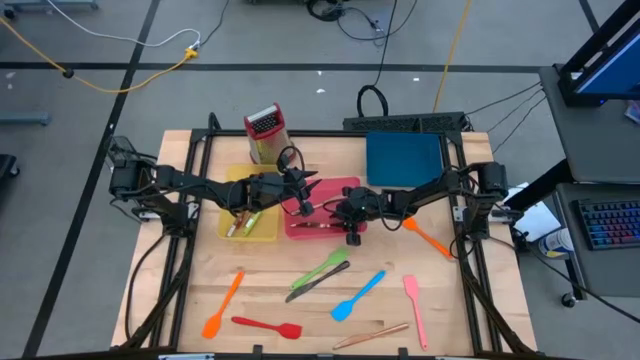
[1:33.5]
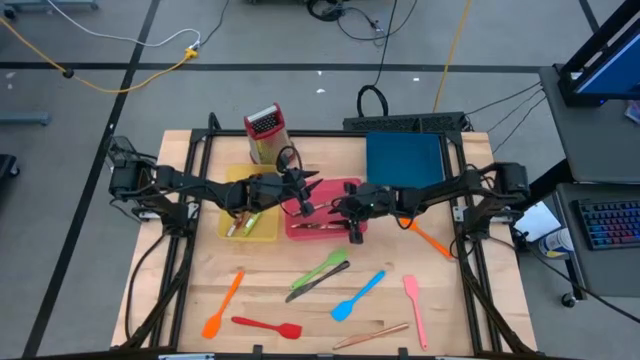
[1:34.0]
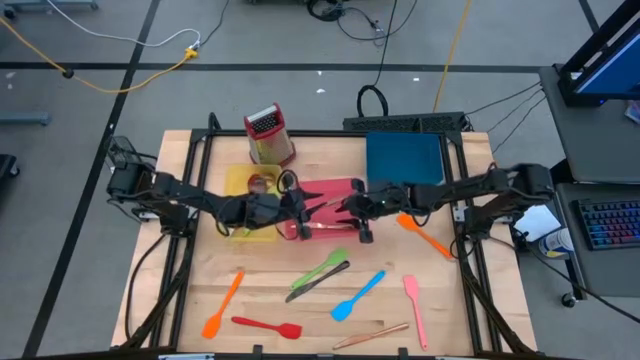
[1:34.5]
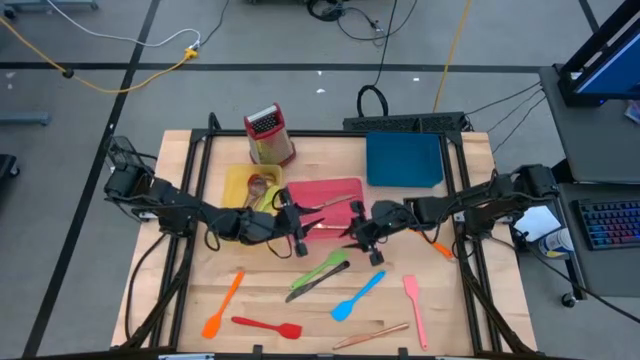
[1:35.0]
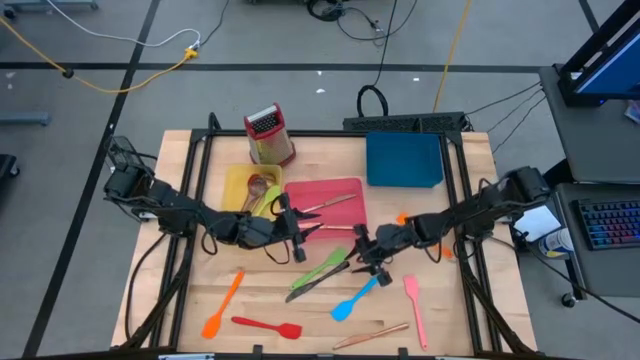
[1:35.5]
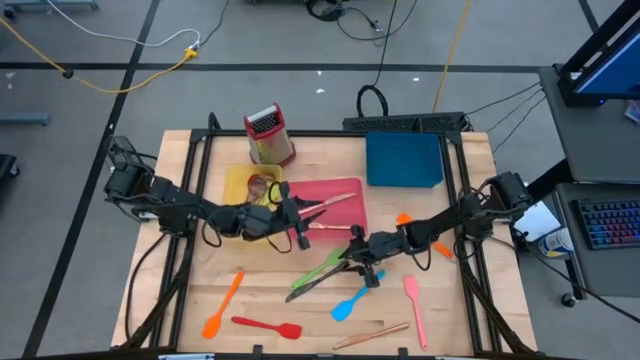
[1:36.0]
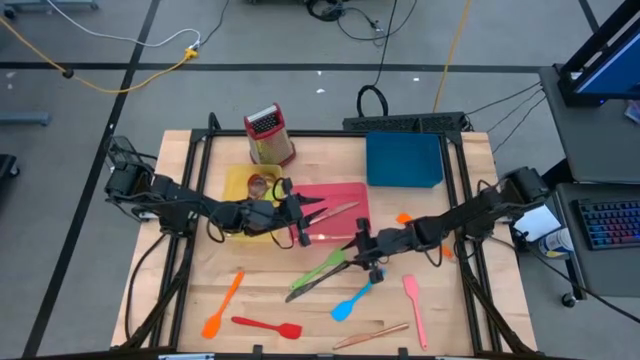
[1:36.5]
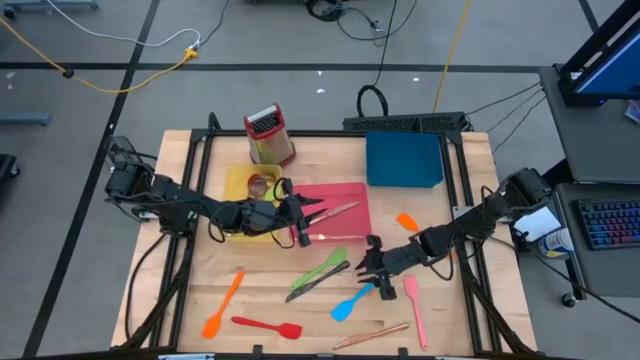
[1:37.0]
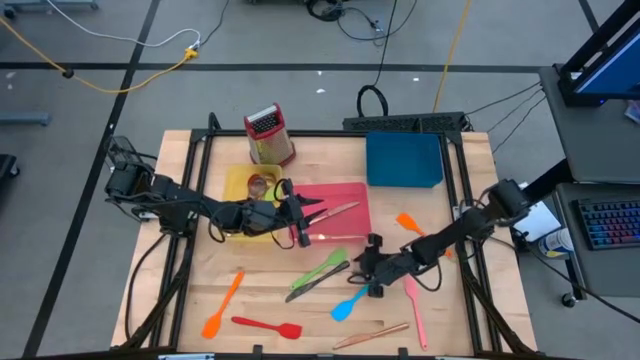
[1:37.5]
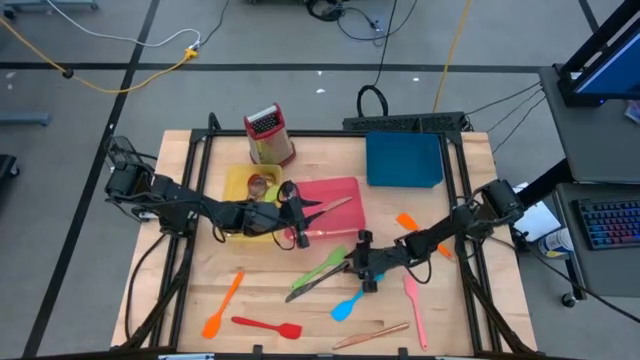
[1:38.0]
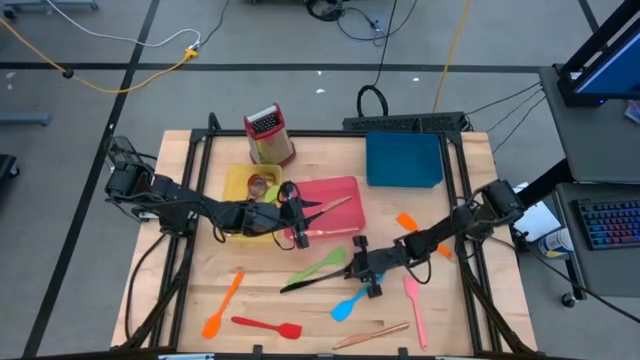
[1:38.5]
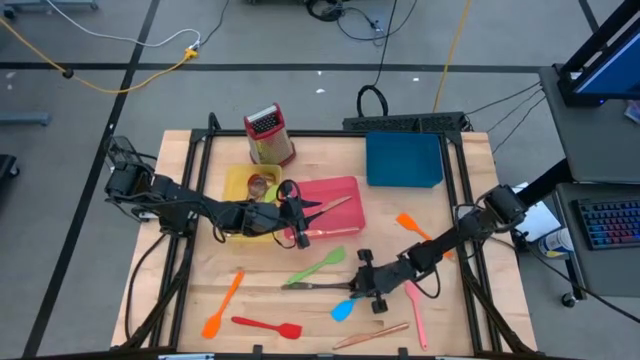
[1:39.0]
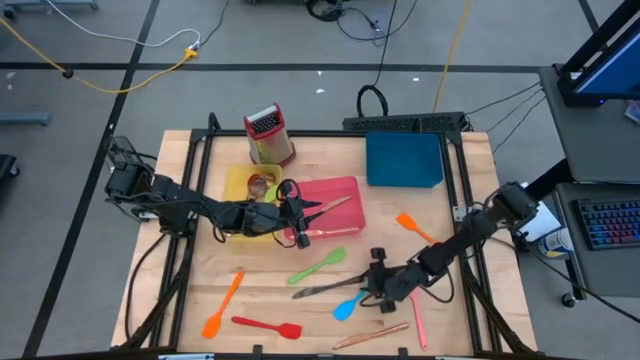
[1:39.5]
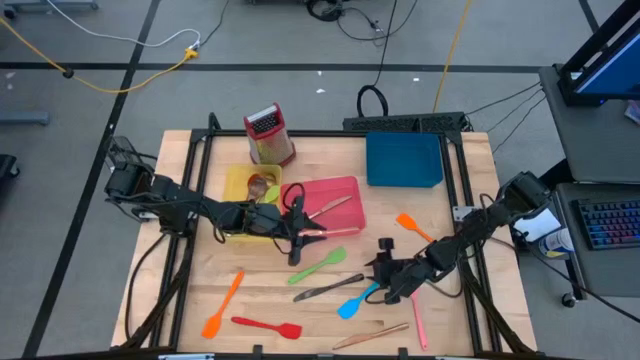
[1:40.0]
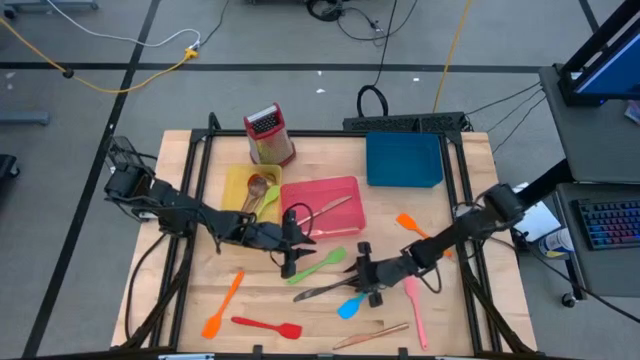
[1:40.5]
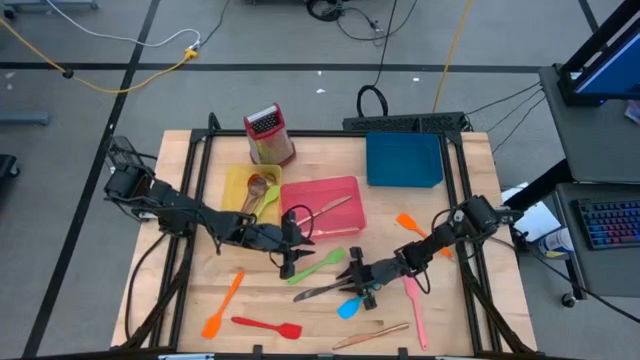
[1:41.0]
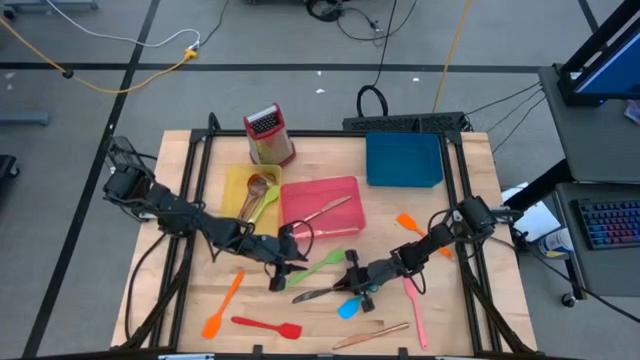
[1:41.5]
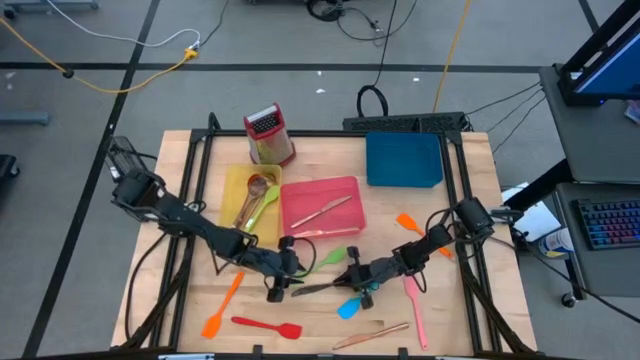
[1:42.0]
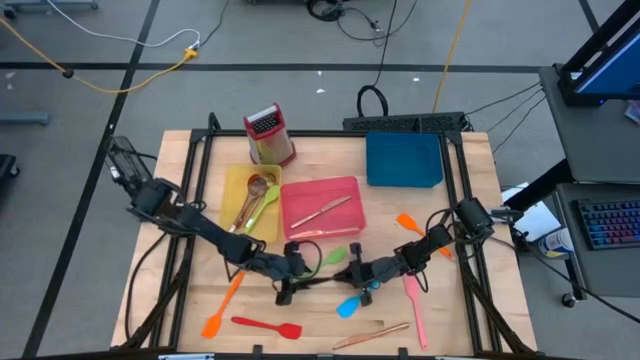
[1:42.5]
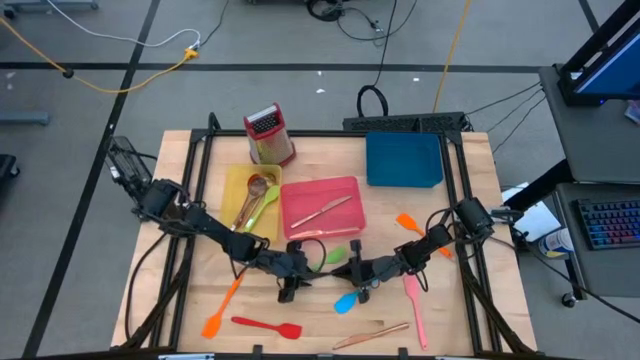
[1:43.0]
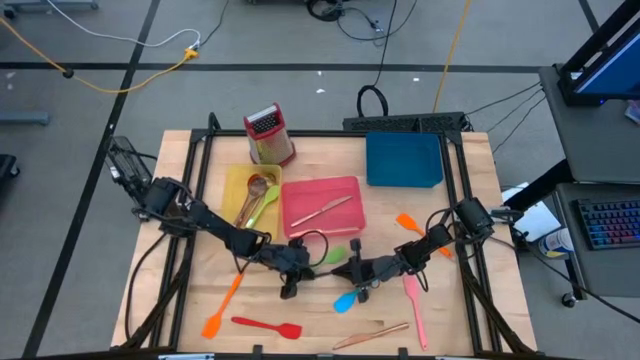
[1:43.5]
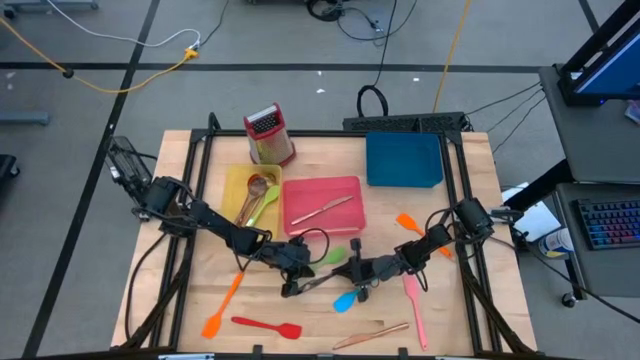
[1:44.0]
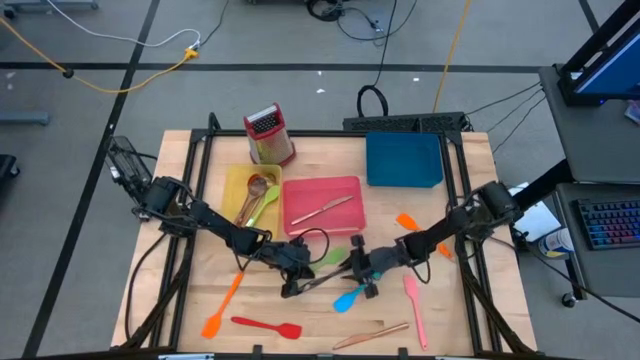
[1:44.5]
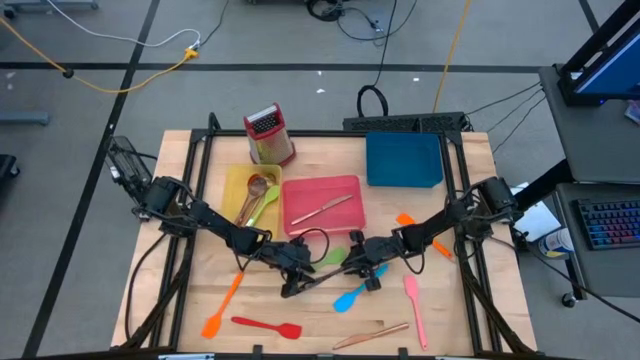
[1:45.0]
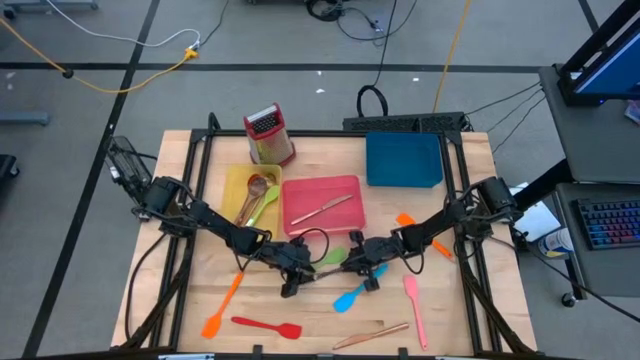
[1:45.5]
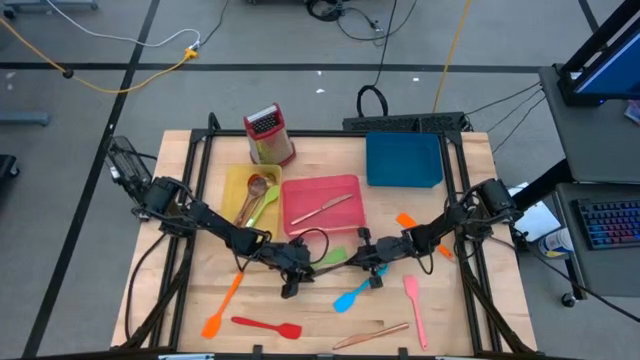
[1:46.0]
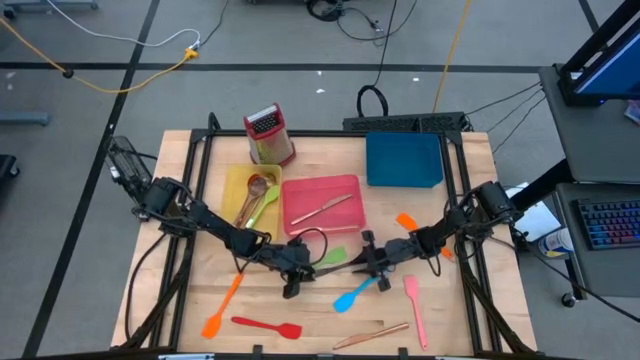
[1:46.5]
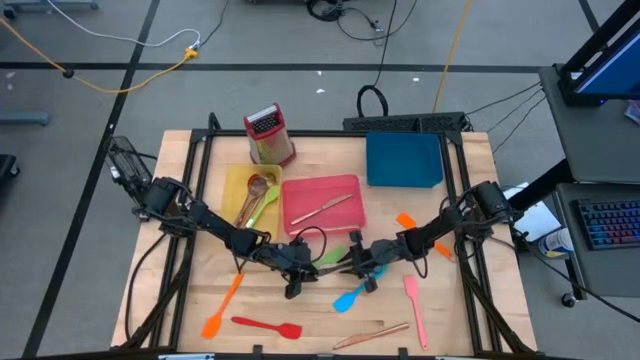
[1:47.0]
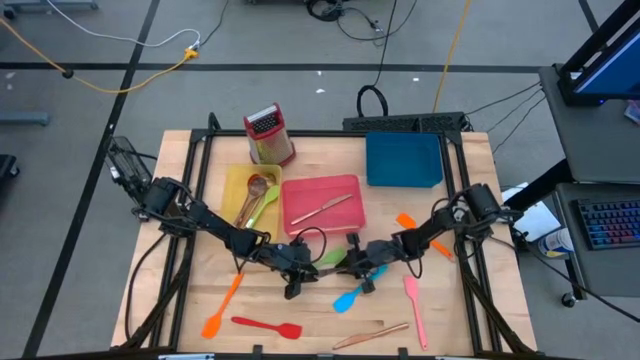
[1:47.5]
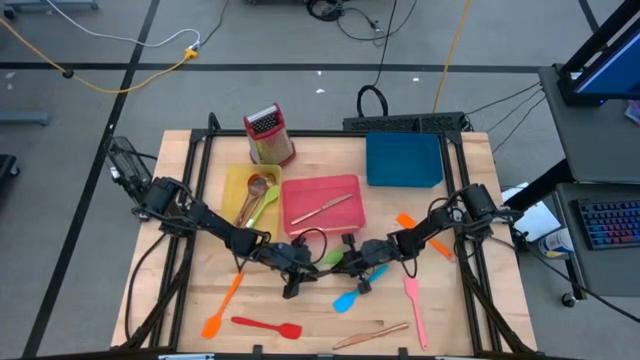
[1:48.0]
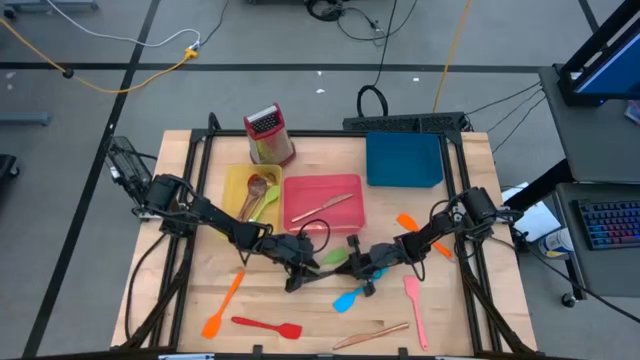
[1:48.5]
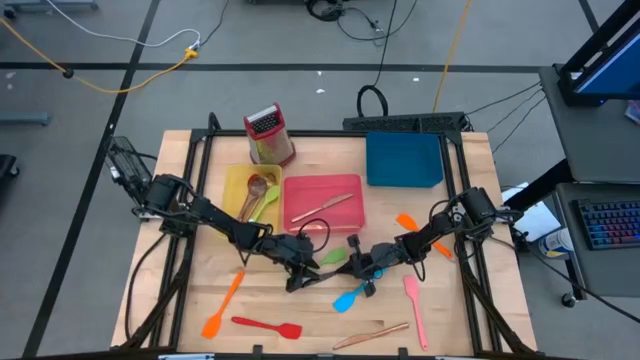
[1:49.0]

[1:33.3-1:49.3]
Task: Pick & Place Kitchen Items
Put the black table knife into the pink bin

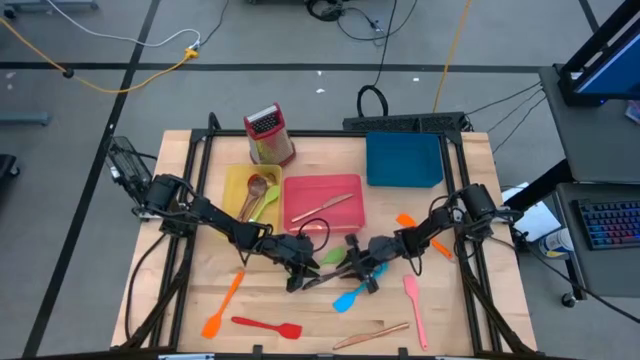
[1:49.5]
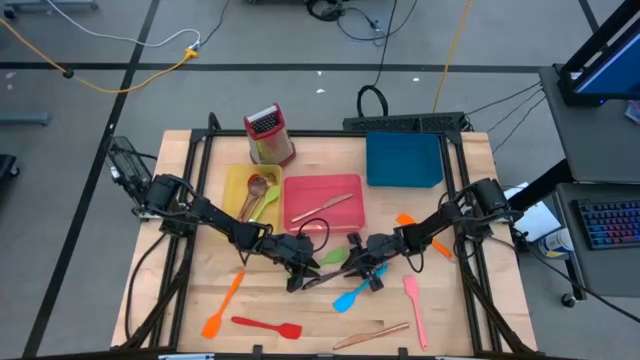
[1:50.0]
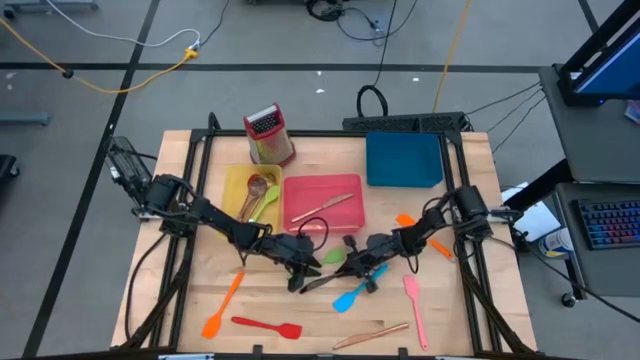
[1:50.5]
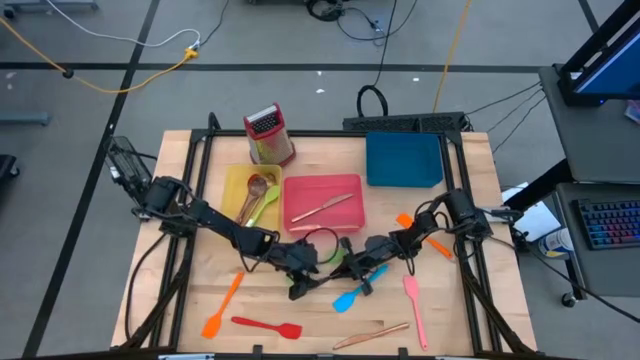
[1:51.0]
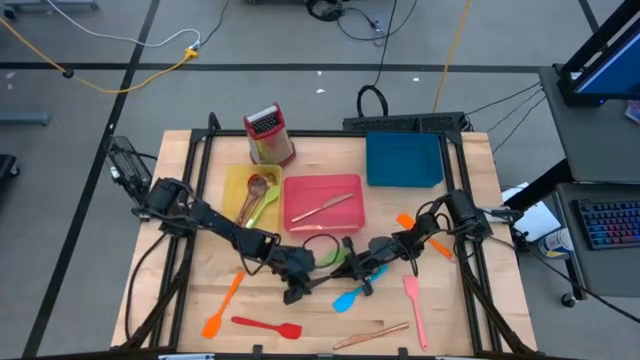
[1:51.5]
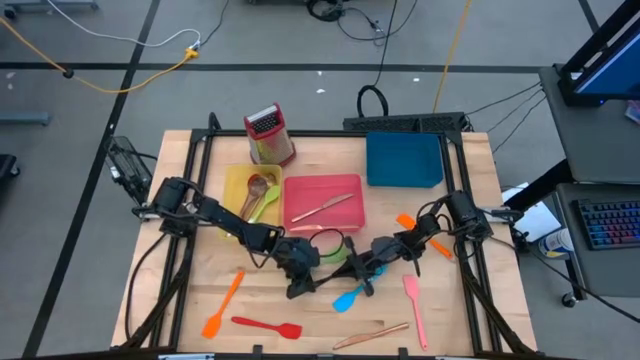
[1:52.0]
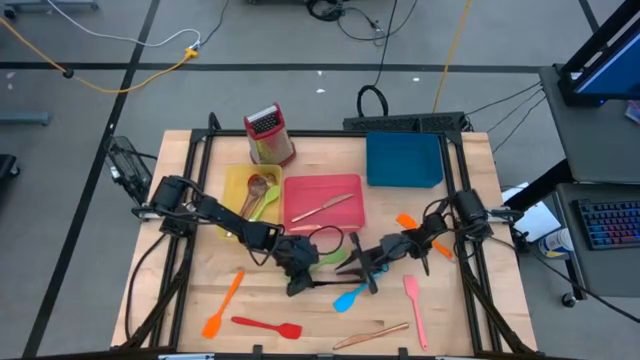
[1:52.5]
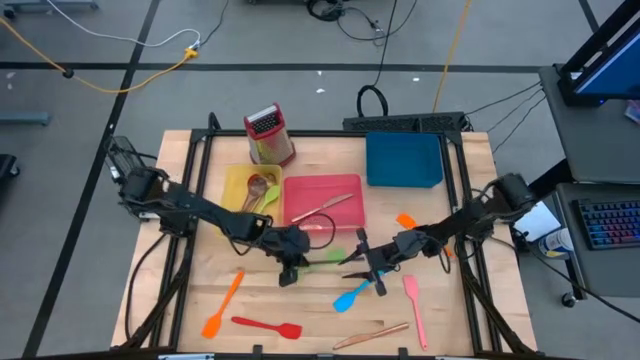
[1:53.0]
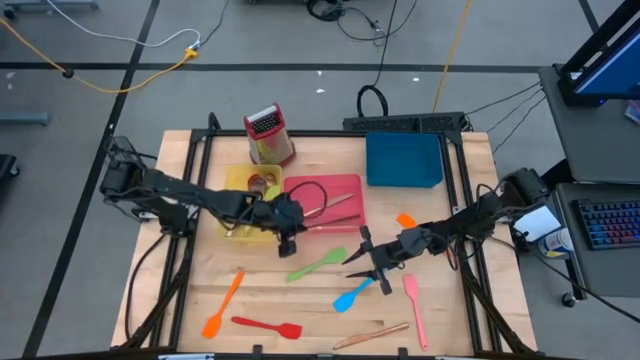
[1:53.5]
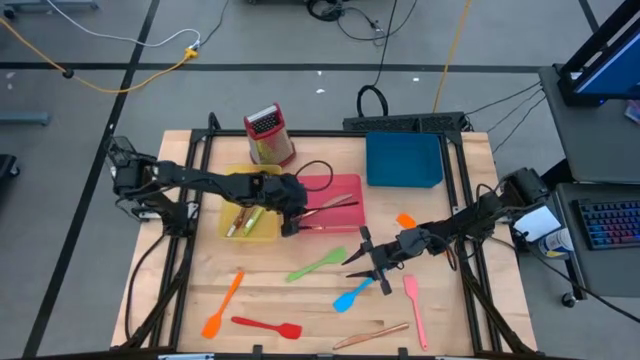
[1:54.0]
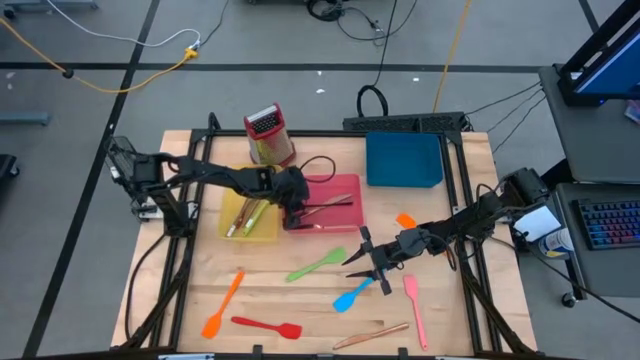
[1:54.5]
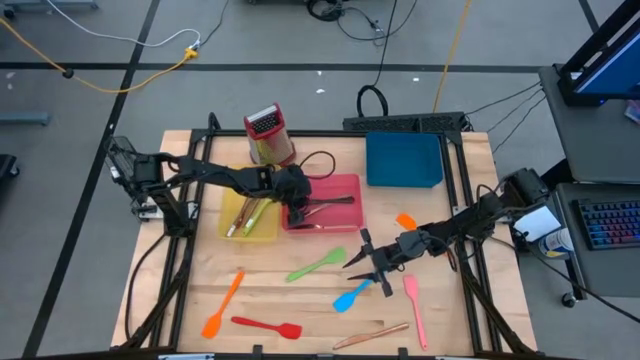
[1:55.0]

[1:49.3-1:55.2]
Put the black table knife into the pink bin
